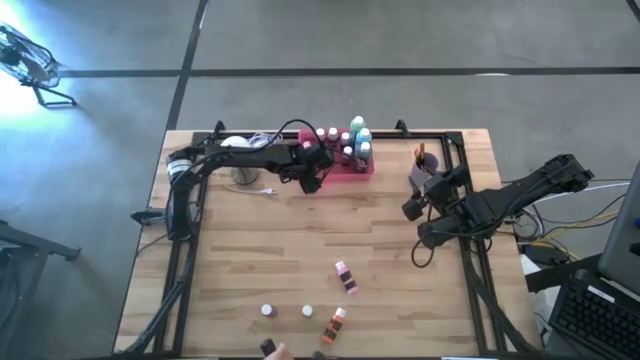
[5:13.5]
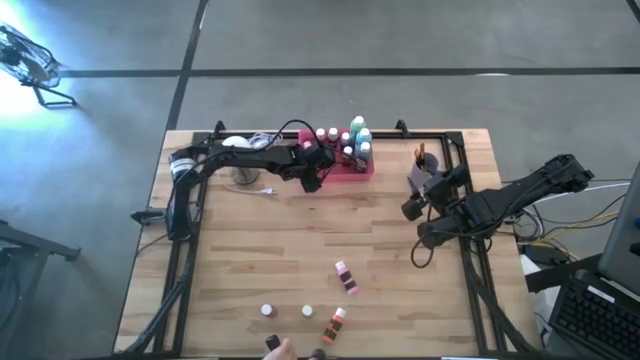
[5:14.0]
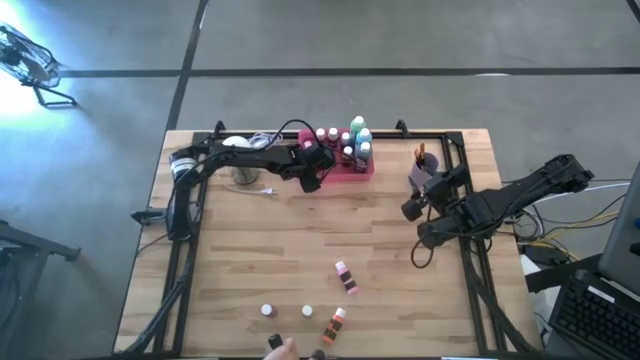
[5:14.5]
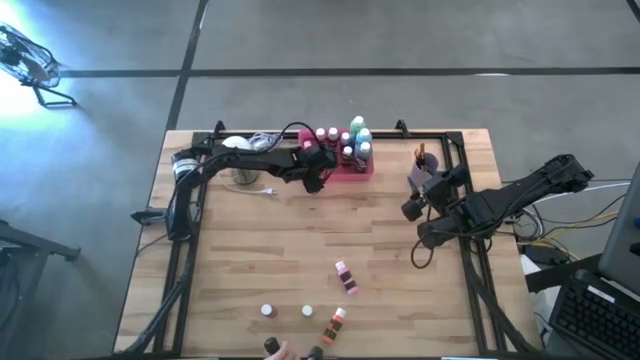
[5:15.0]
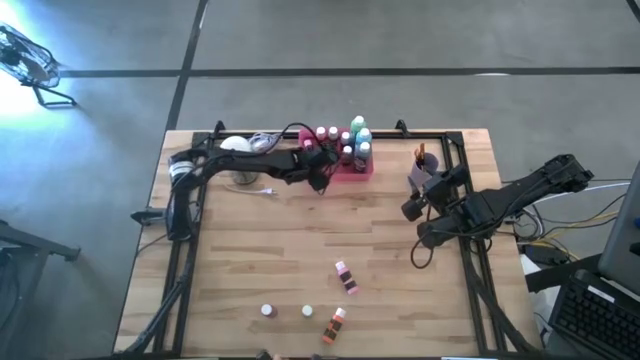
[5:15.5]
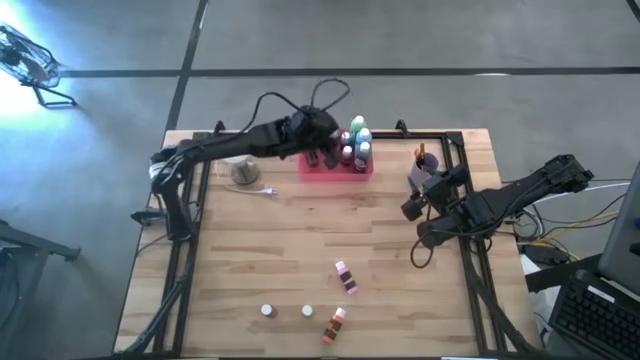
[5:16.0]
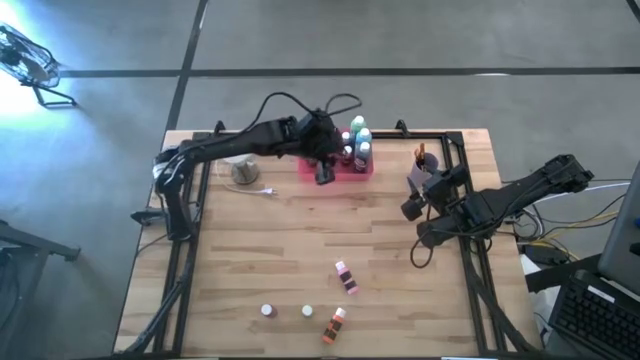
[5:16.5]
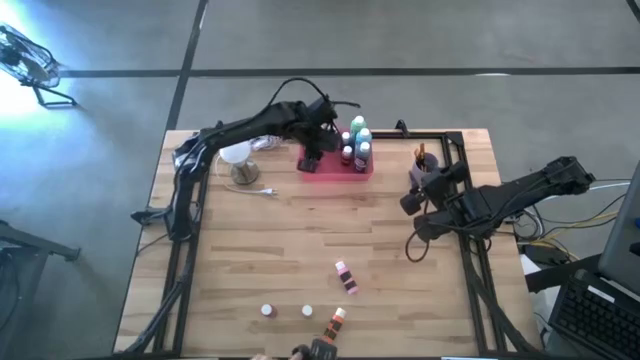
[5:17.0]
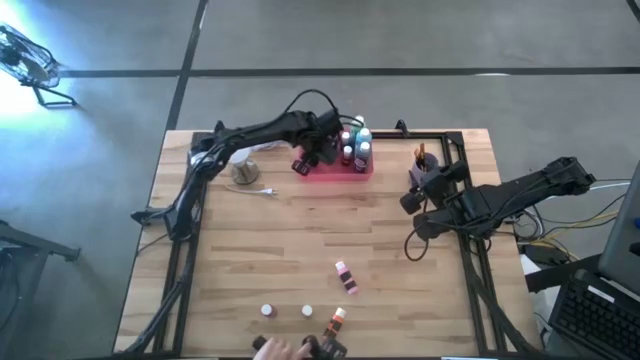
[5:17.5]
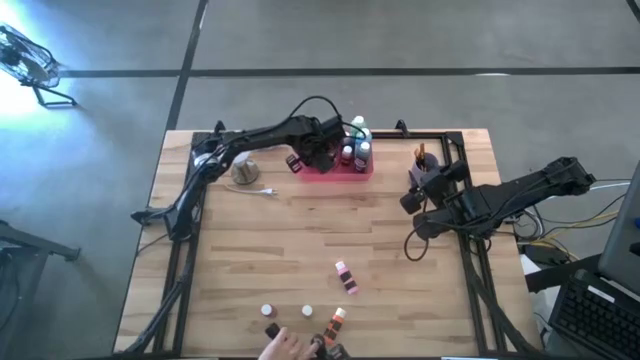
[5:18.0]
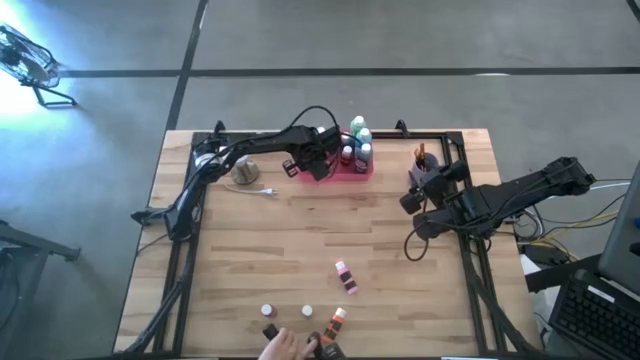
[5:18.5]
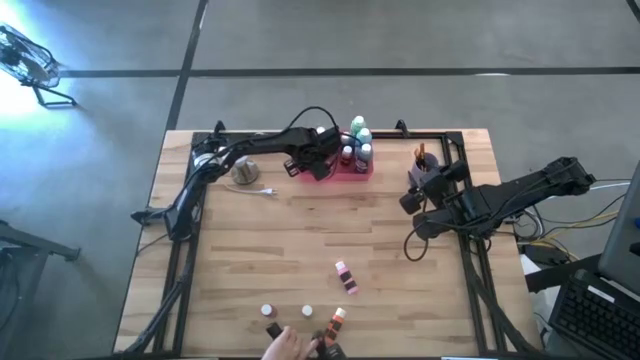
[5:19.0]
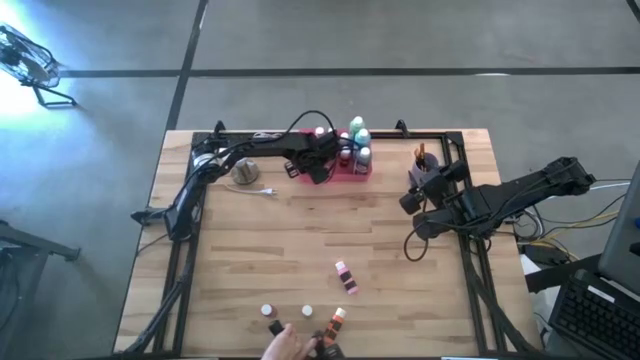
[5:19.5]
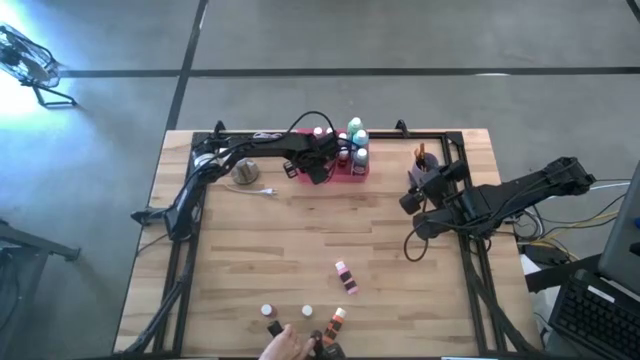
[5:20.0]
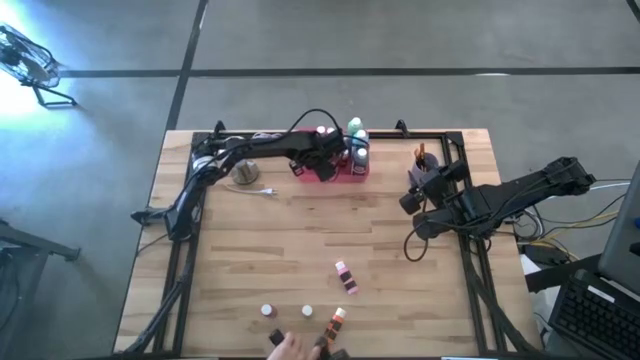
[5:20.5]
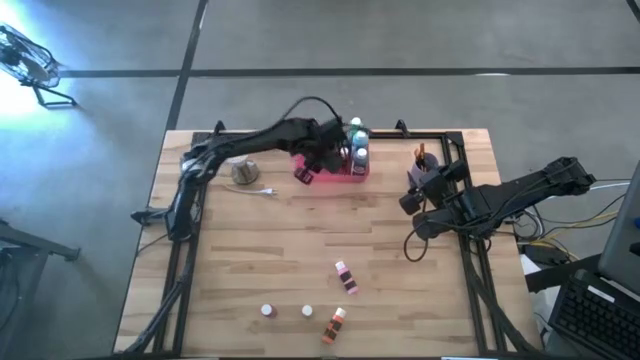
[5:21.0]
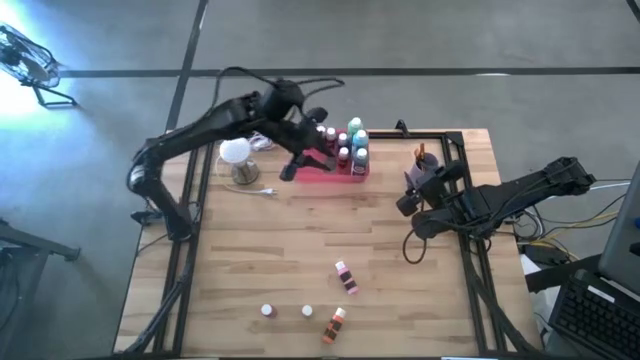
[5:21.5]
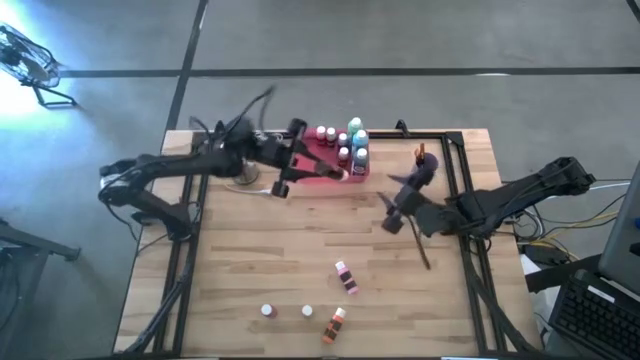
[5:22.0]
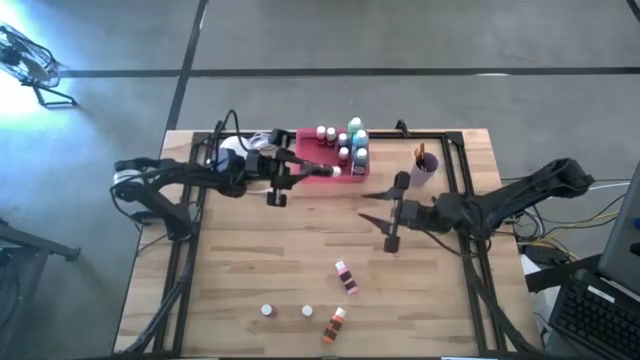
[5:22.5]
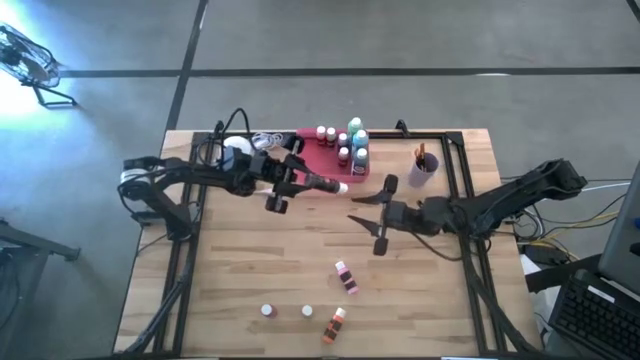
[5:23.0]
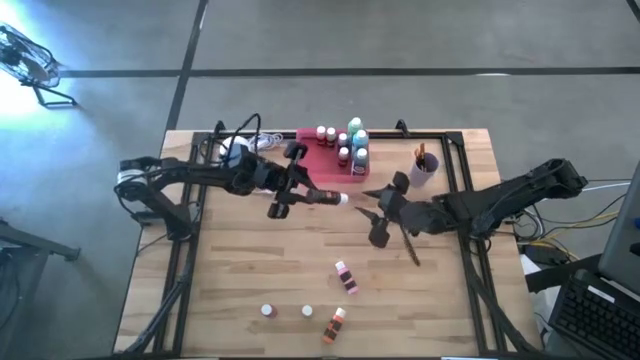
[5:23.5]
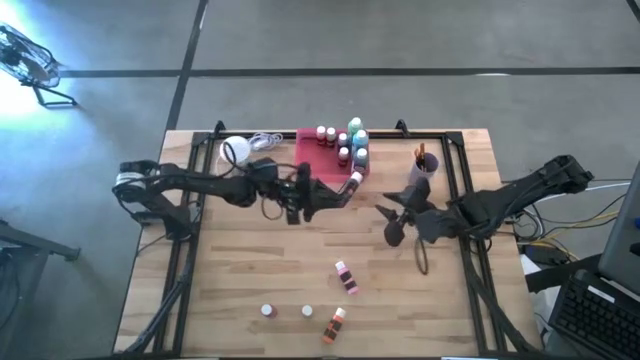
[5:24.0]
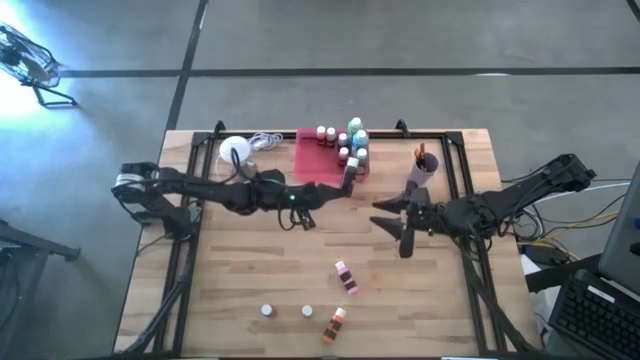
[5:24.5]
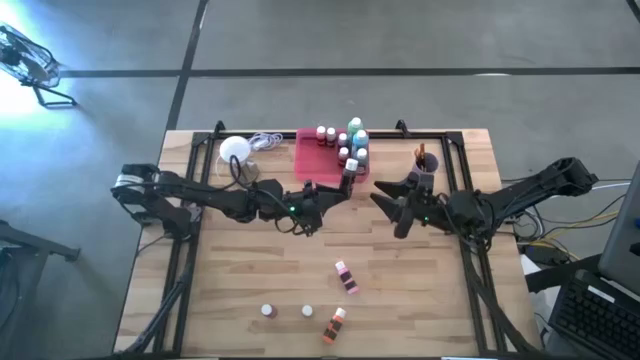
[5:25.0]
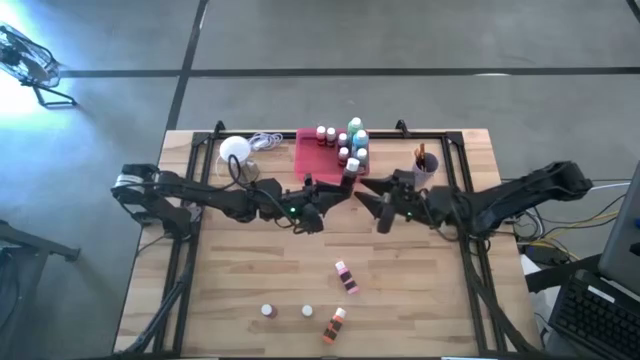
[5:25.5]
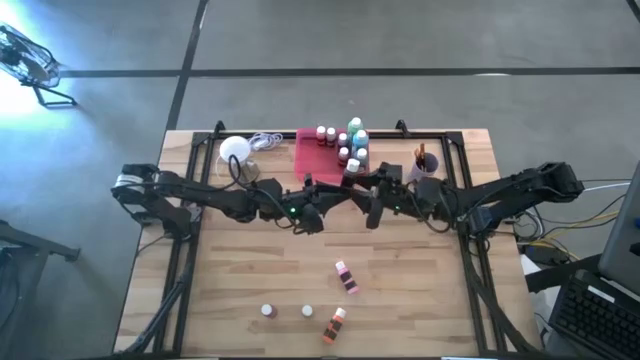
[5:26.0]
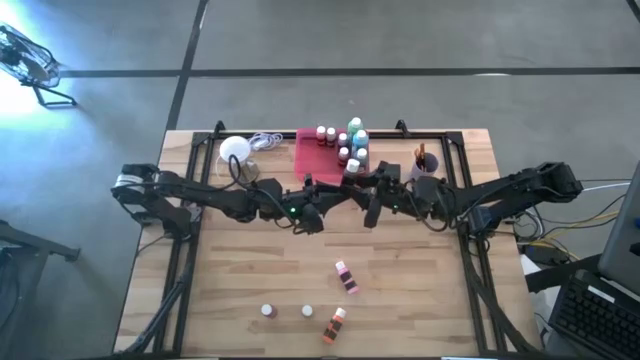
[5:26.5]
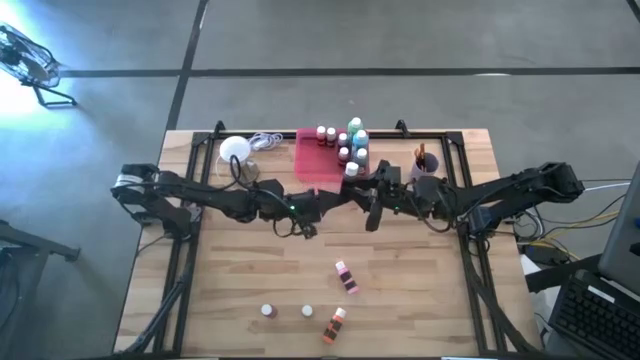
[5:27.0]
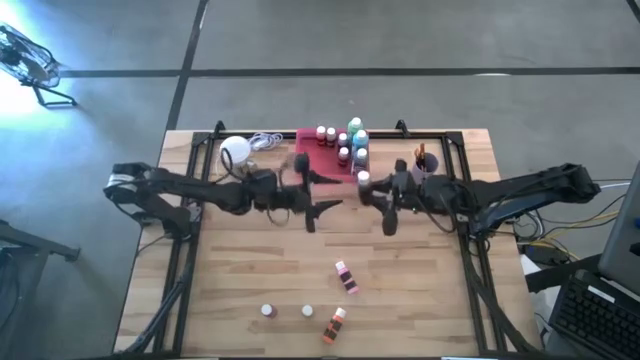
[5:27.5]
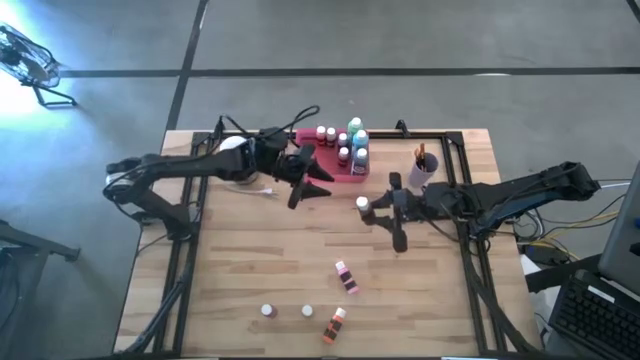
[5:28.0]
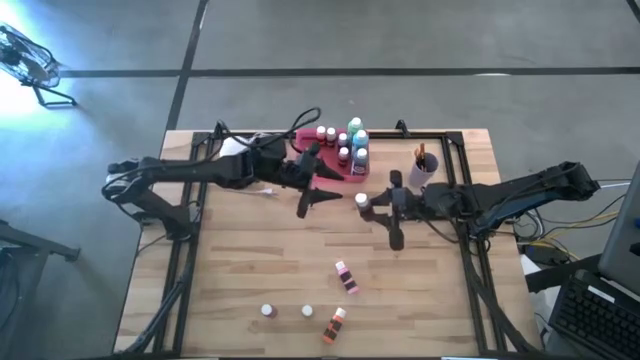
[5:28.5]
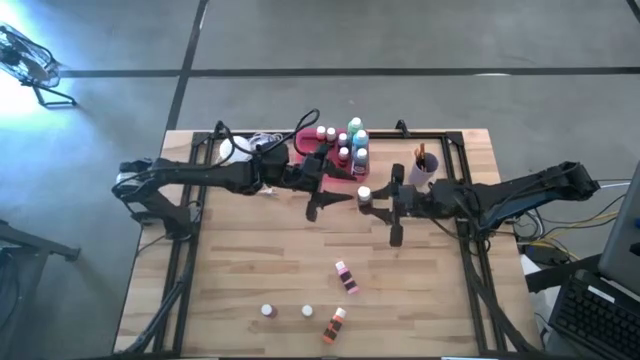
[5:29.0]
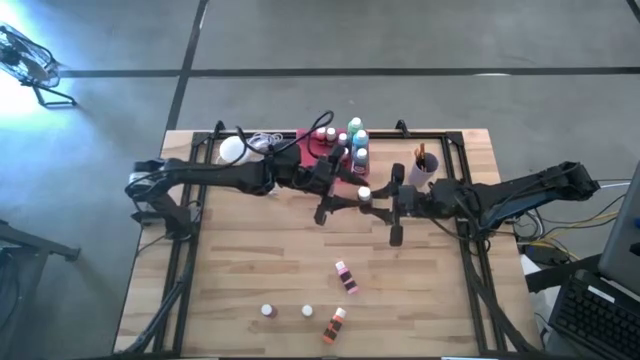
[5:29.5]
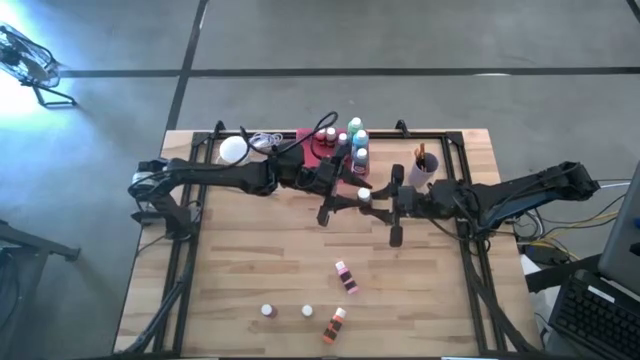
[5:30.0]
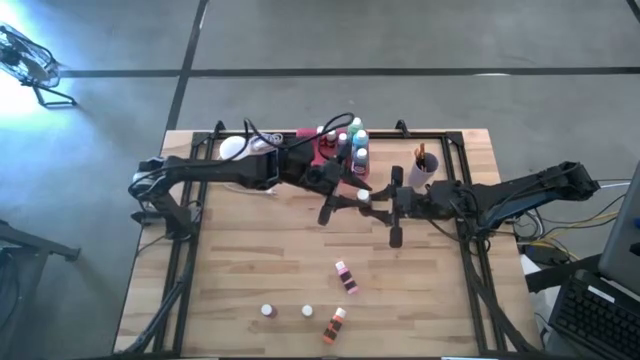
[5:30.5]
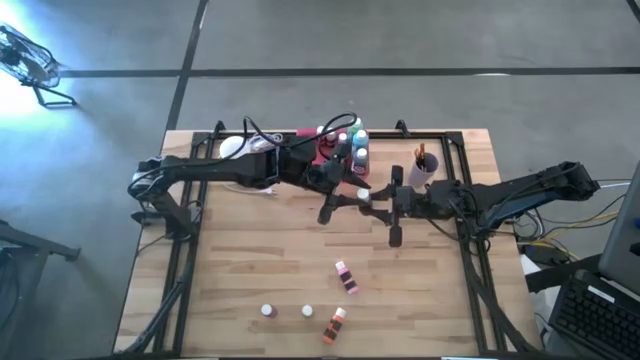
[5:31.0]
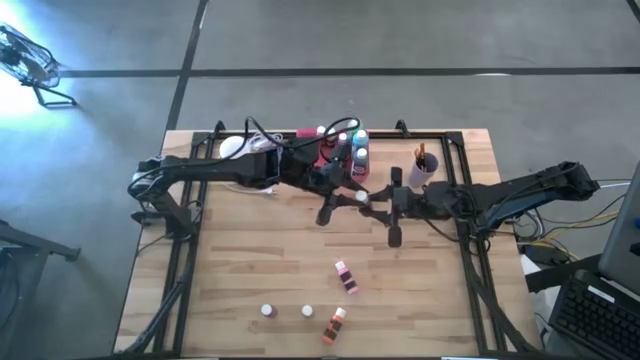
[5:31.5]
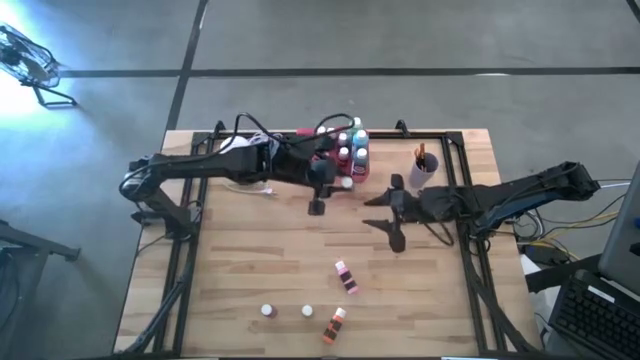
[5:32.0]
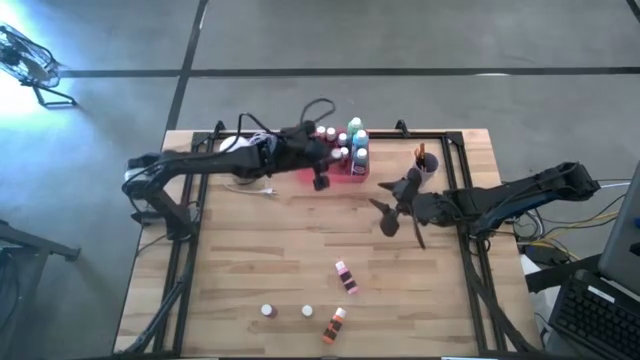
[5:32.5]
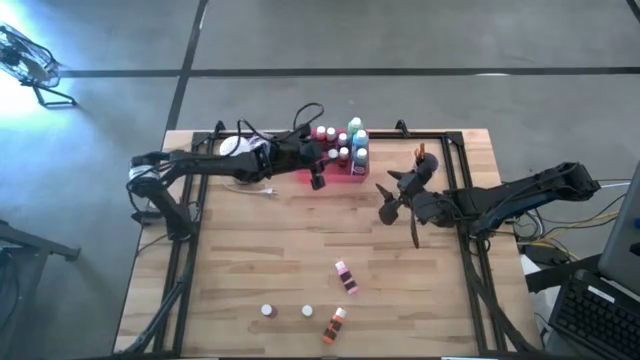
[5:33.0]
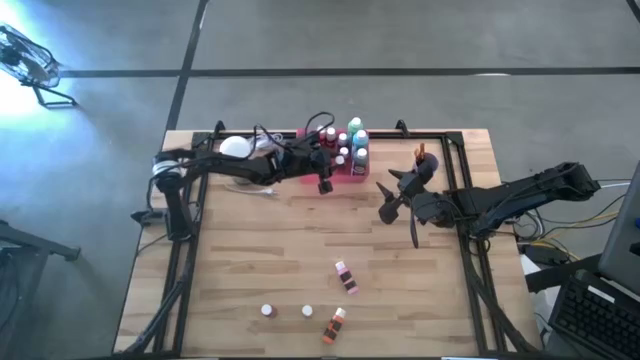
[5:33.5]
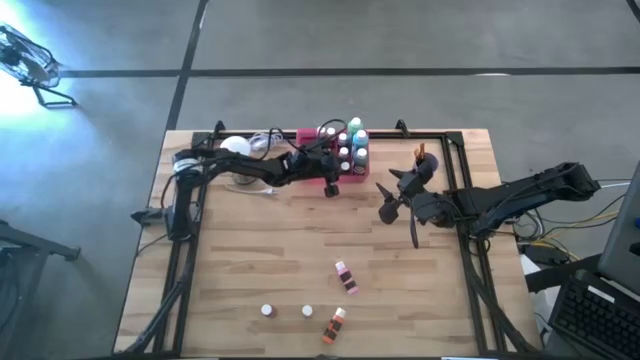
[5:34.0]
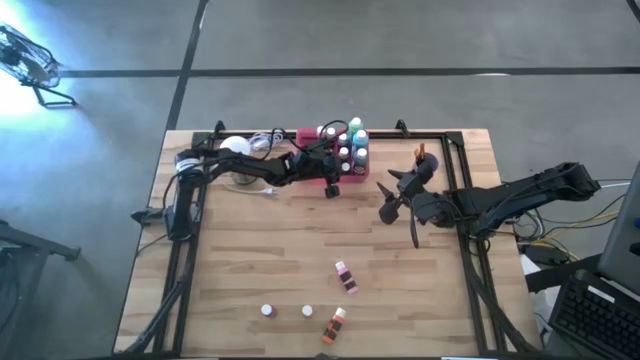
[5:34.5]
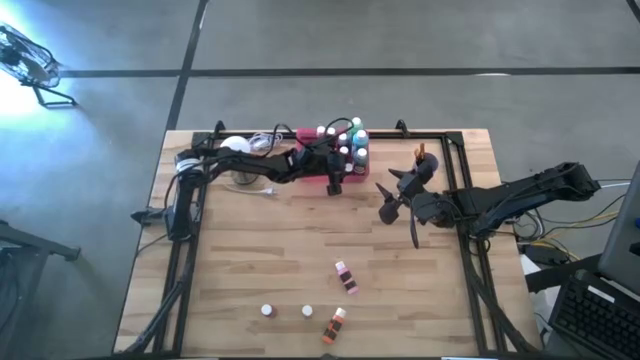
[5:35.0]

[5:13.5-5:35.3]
Task: Pick & Place Paint Supplies
Put the dark brown black paint bottle into the pink bin
